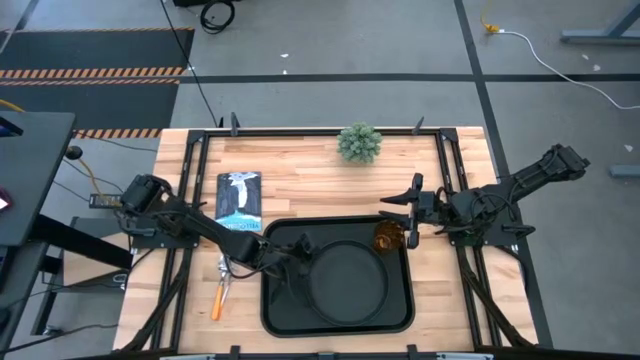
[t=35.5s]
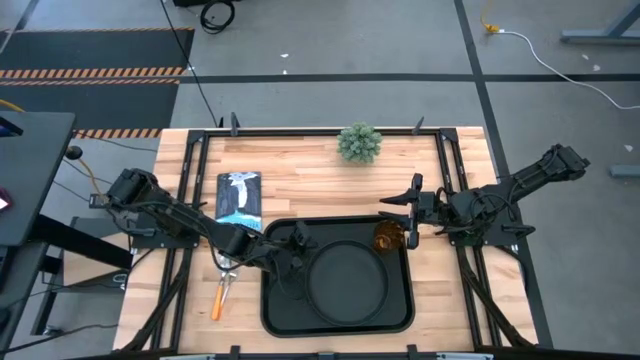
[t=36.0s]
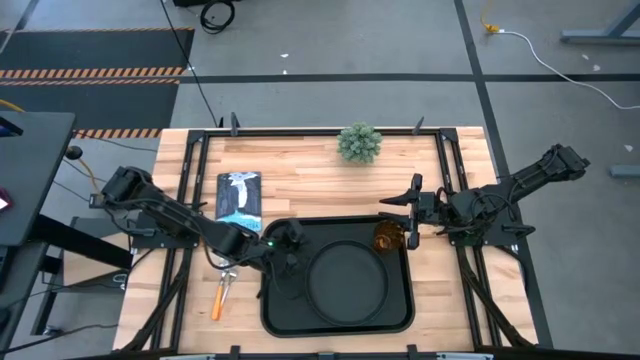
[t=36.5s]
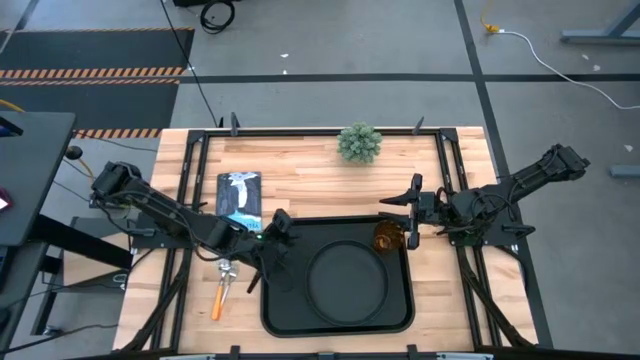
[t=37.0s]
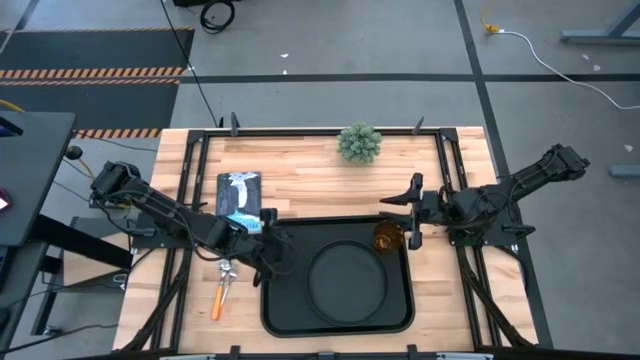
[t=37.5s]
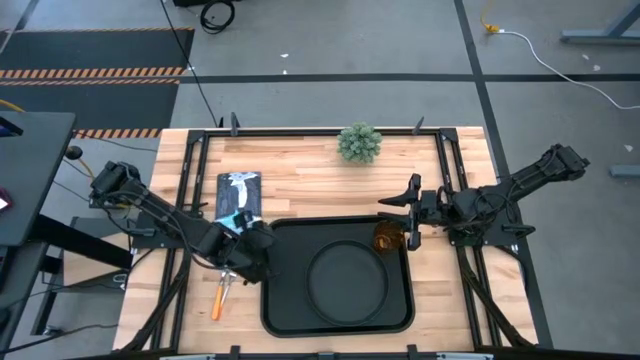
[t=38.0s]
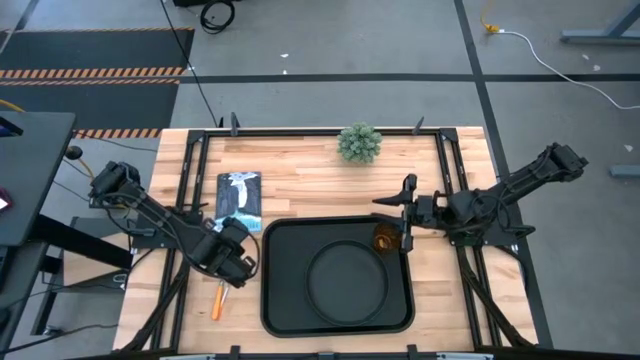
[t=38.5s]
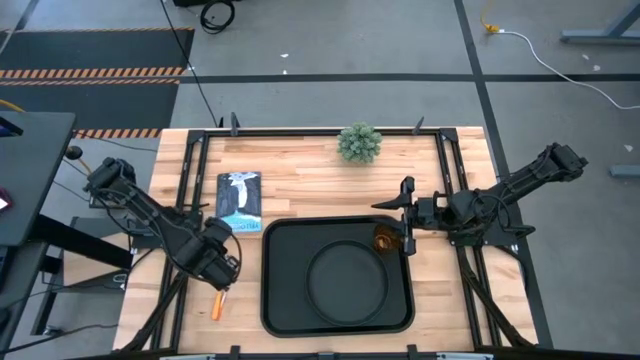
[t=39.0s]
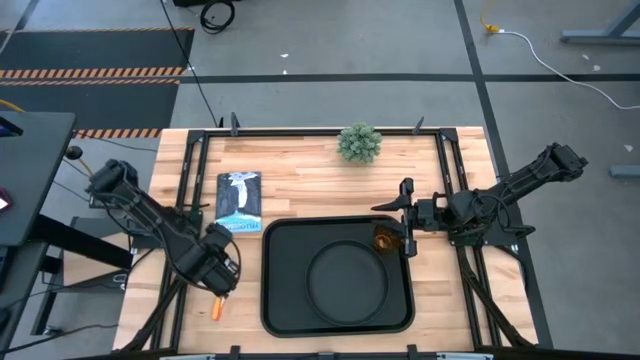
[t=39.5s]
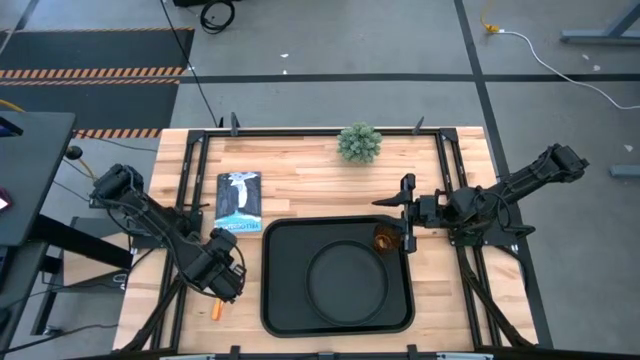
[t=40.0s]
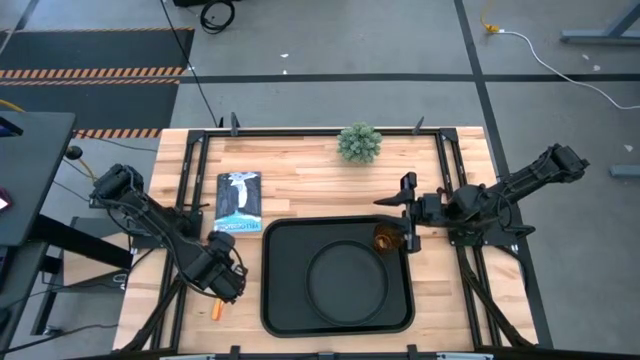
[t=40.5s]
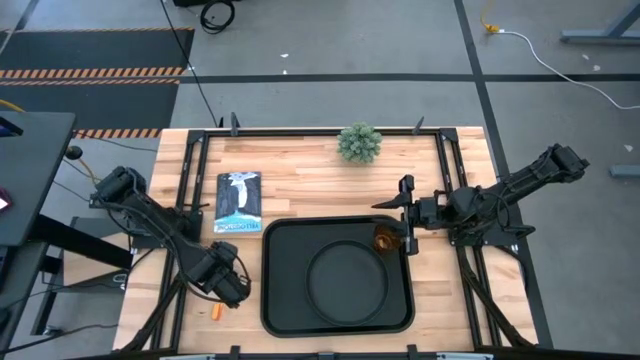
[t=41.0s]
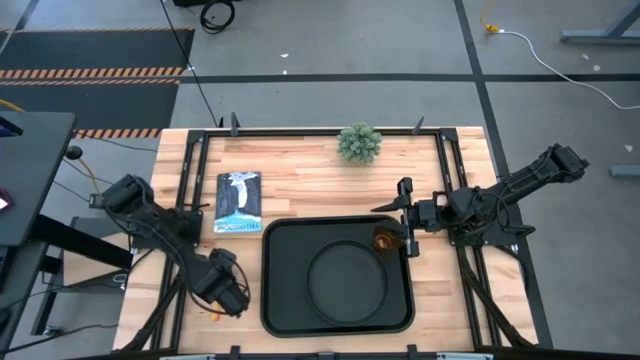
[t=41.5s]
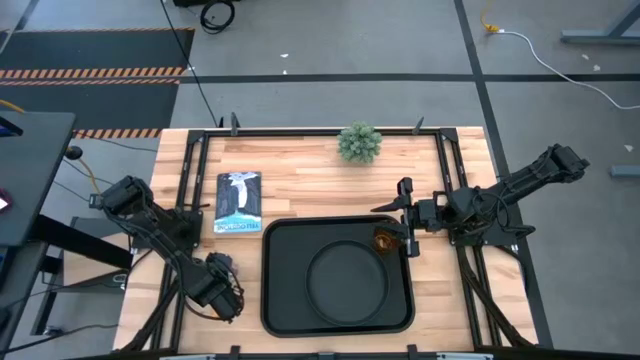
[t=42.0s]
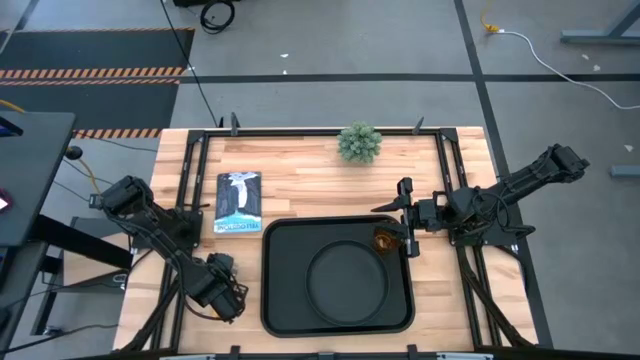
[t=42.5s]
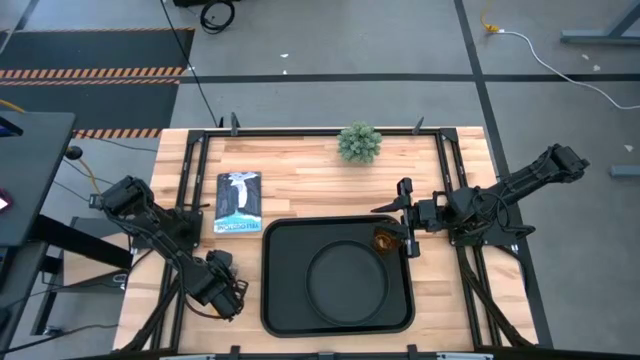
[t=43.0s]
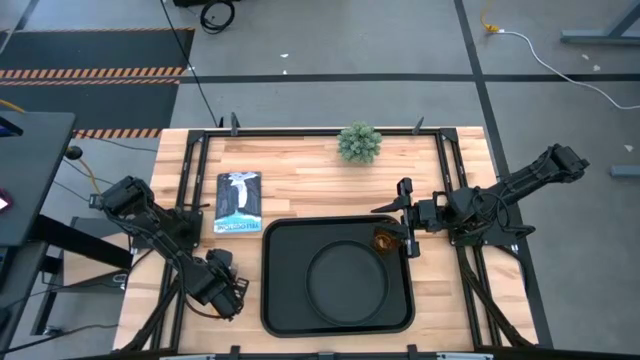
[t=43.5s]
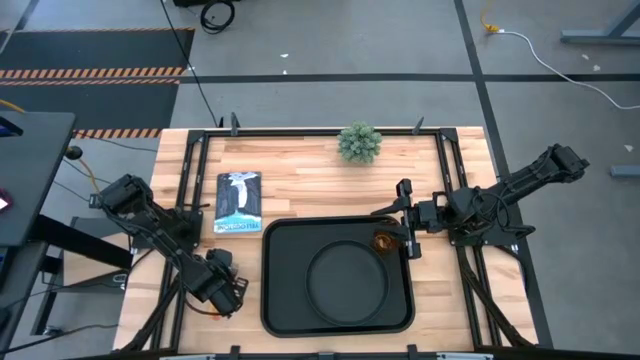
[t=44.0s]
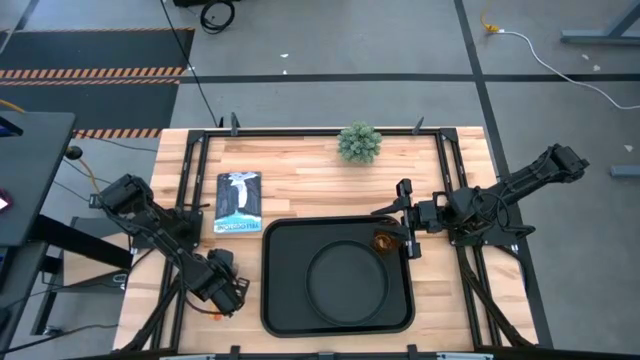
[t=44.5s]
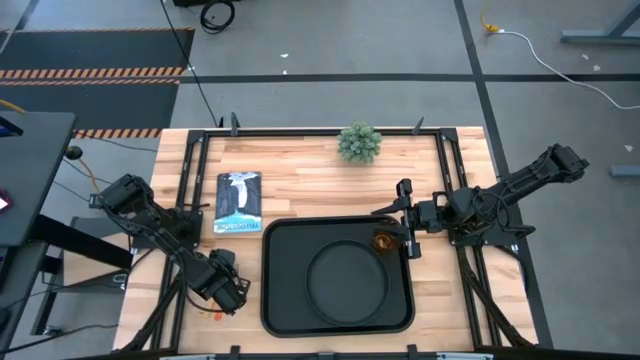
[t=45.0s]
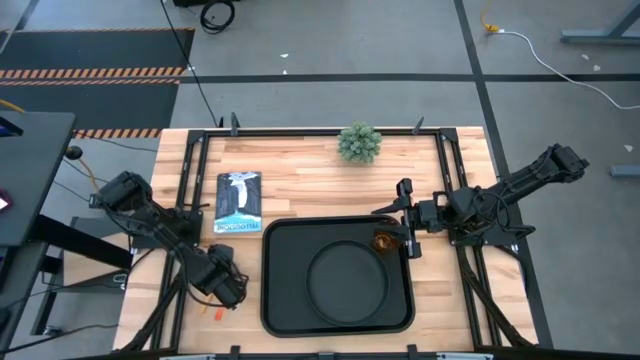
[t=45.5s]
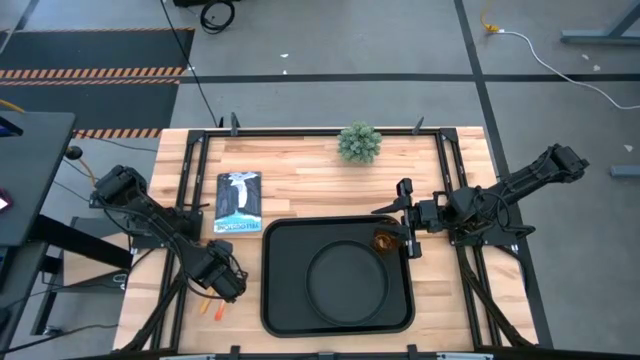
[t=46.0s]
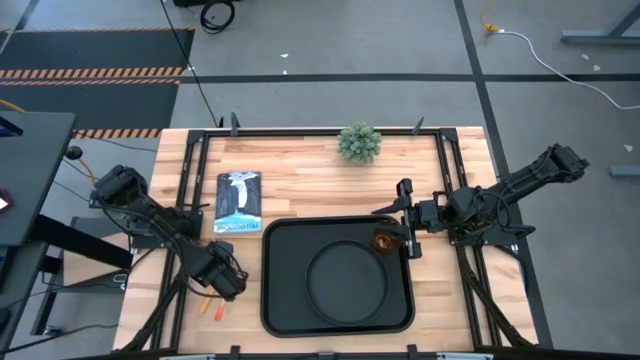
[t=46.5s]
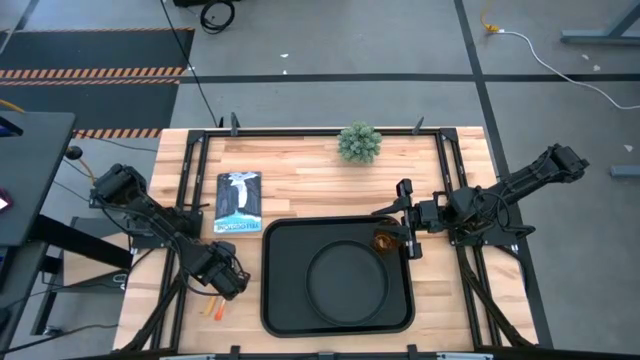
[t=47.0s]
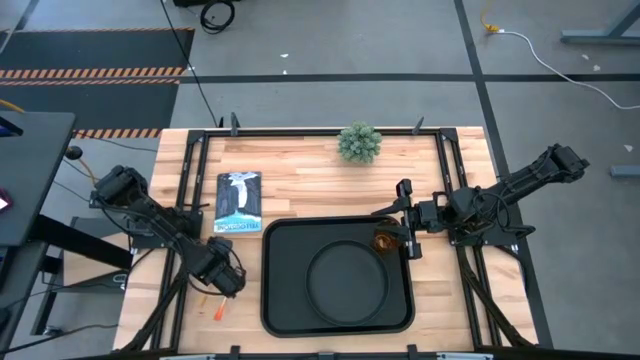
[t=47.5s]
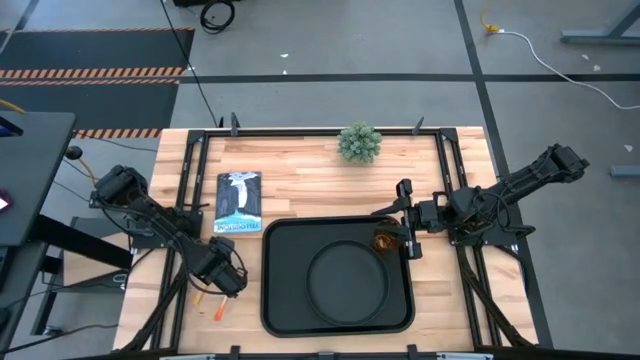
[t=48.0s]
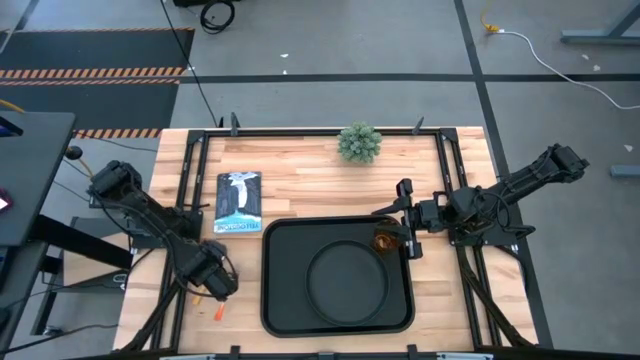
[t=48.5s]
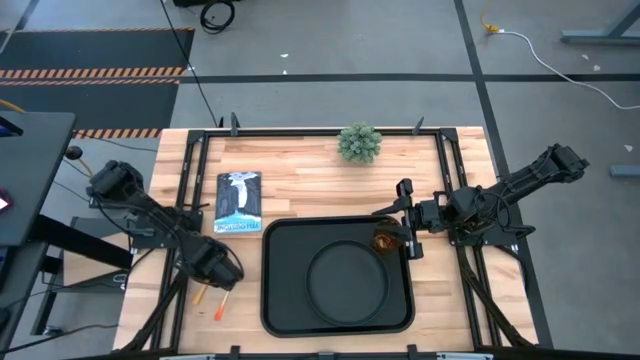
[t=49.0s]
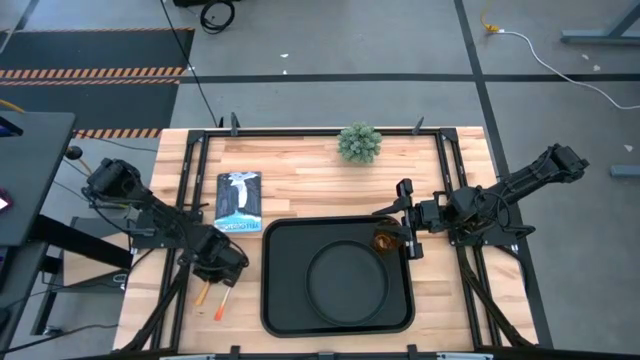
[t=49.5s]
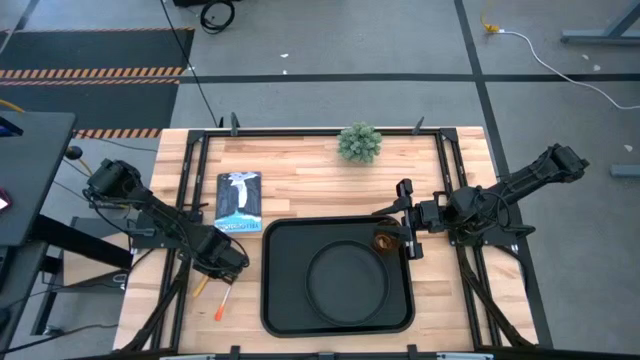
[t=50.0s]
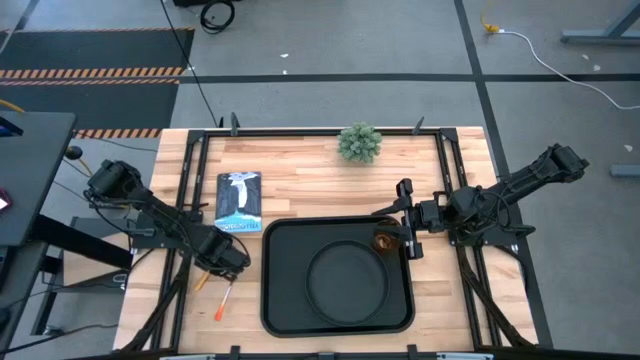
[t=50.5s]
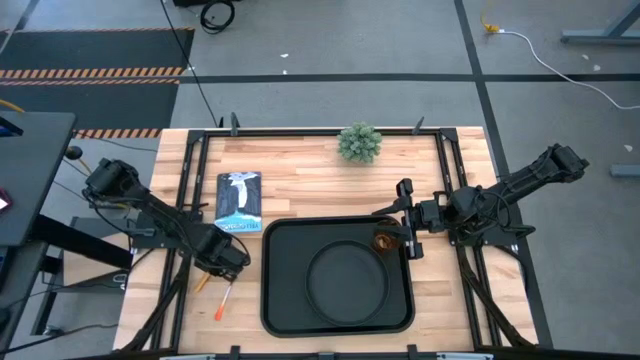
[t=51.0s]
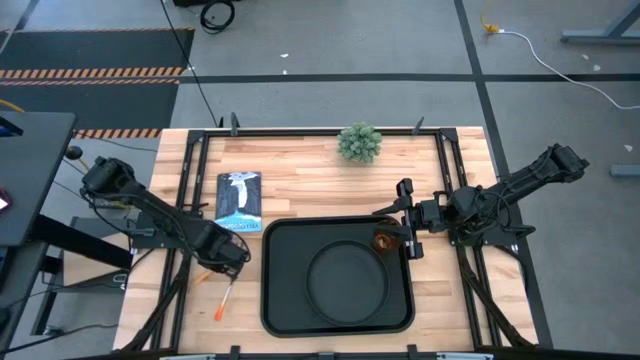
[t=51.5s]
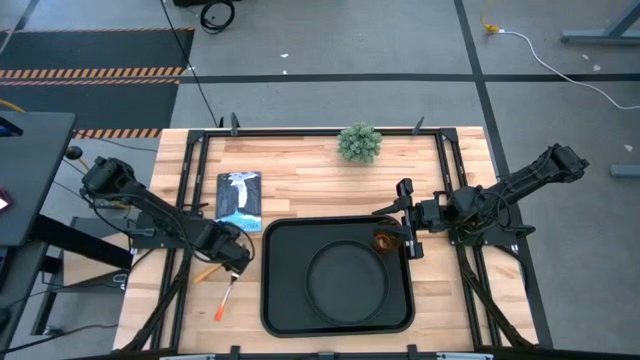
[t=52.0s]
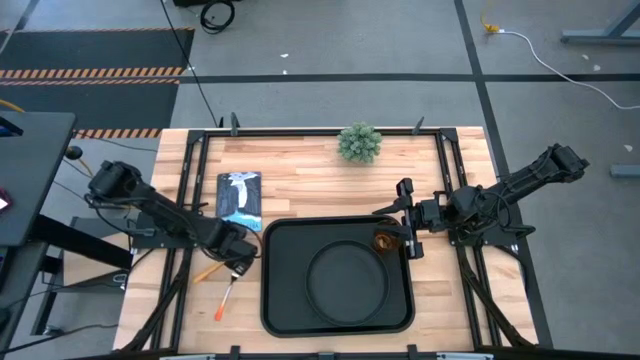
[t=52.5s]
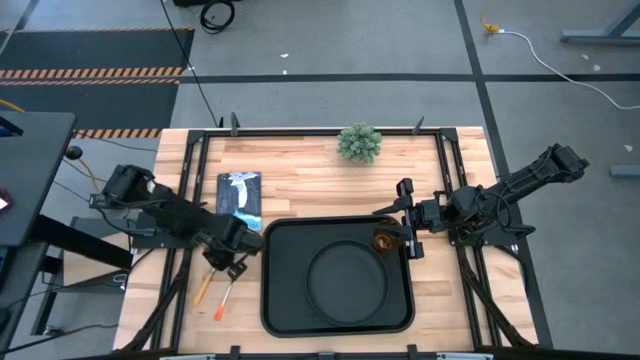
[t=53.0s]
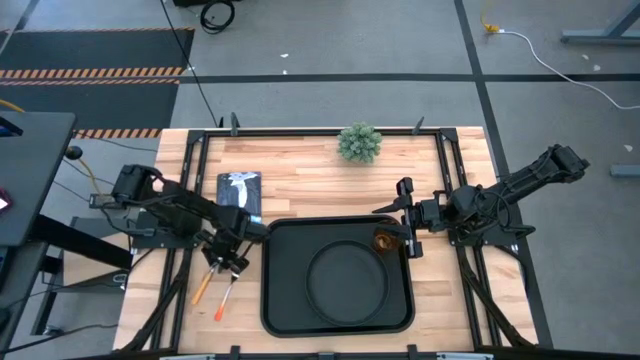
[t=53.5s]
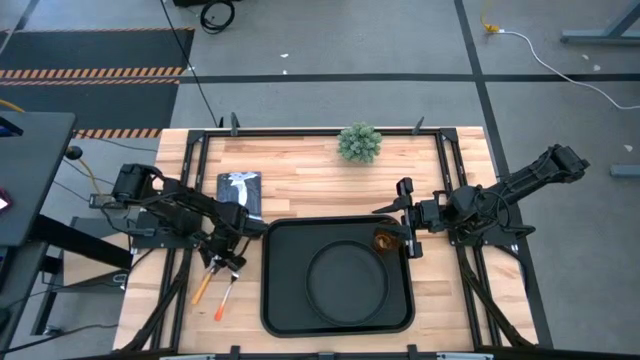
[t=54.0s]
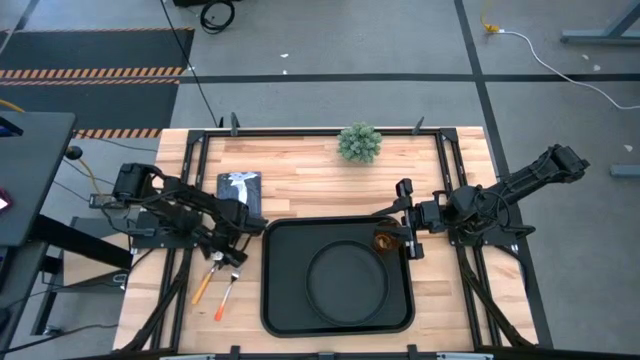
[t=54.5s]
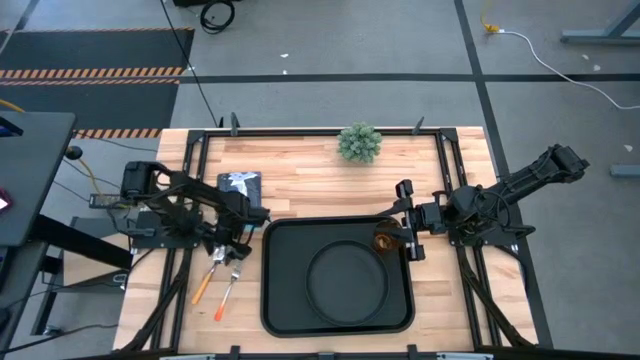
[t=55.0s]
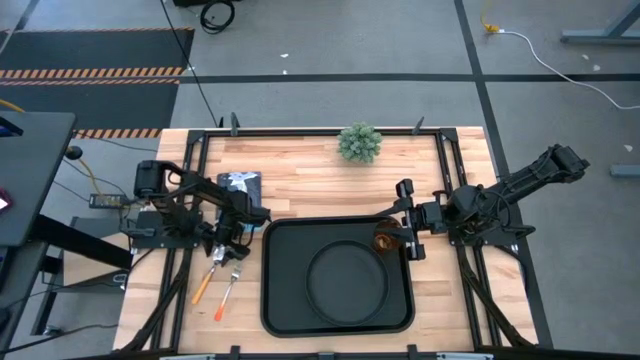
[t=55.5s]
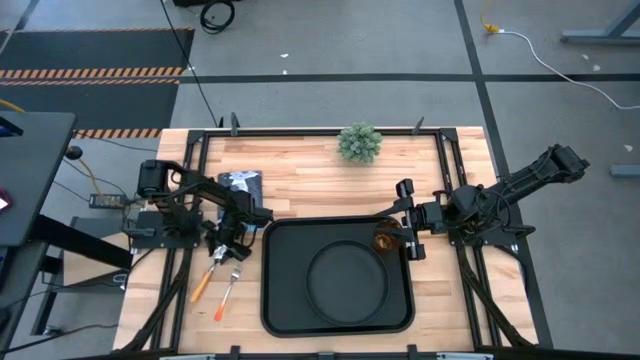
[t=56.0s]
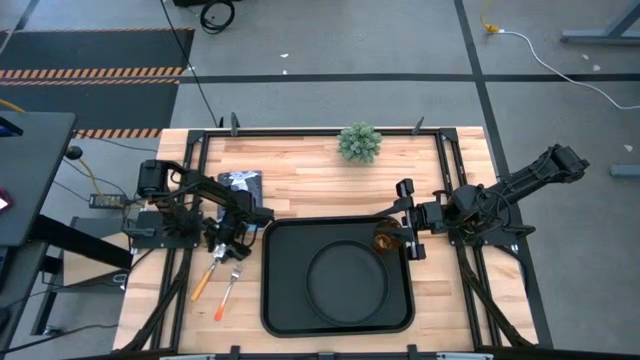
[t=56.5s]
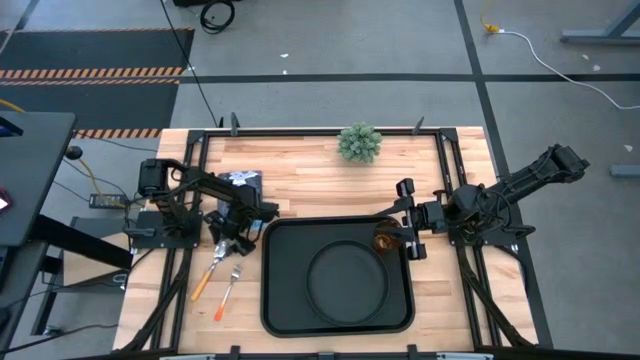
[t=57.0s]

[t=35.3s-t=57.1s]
Task: Pick and place plate/cup/fork/spoon on tray
Put the orange spoon on the black tray
